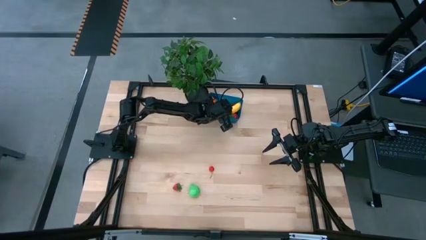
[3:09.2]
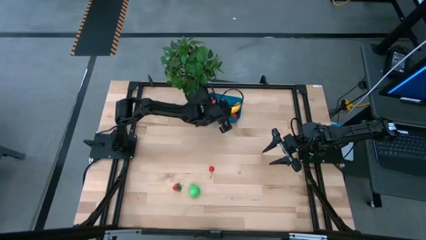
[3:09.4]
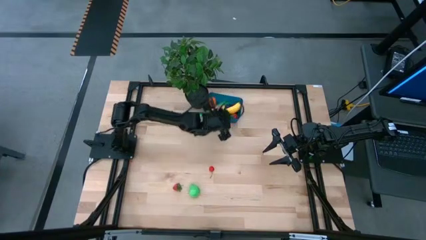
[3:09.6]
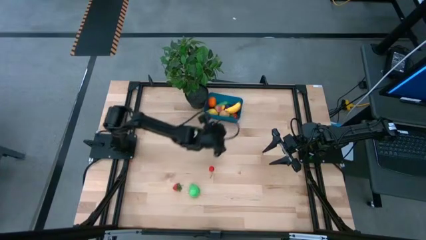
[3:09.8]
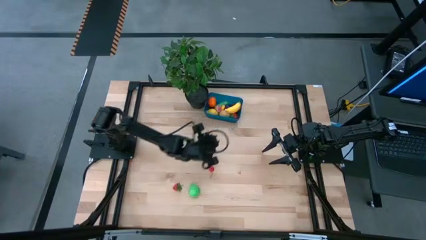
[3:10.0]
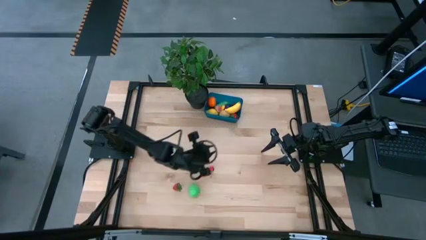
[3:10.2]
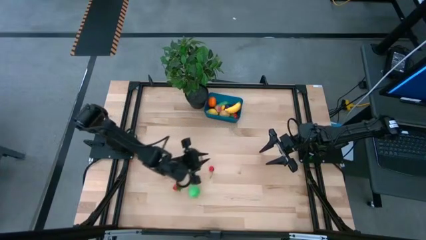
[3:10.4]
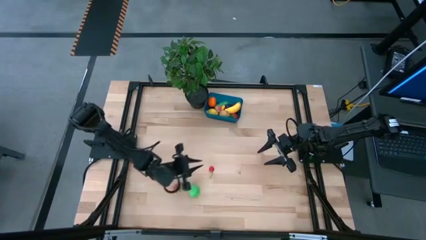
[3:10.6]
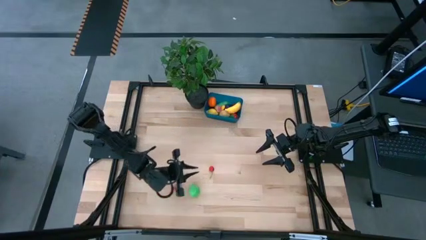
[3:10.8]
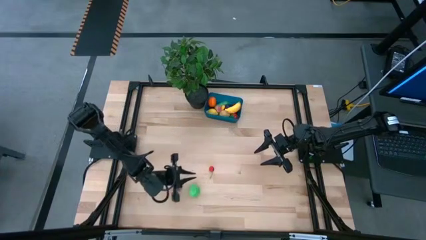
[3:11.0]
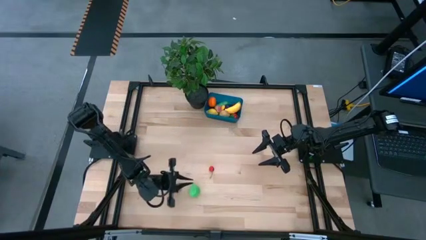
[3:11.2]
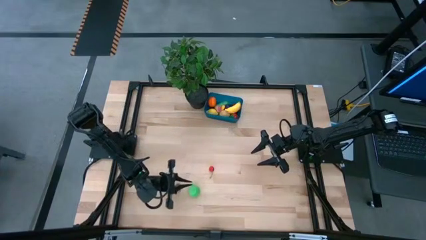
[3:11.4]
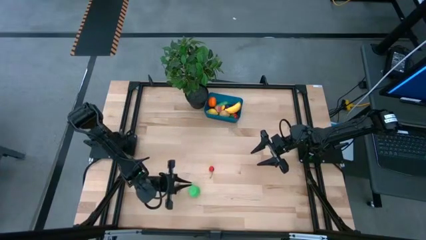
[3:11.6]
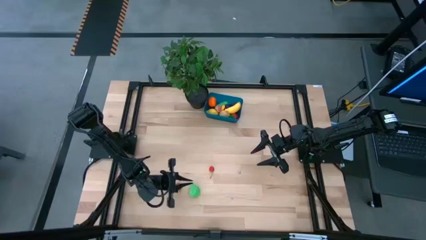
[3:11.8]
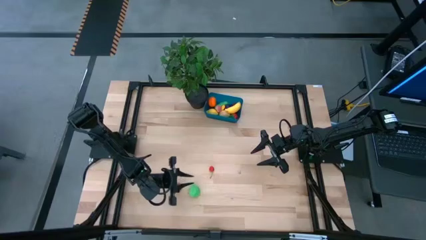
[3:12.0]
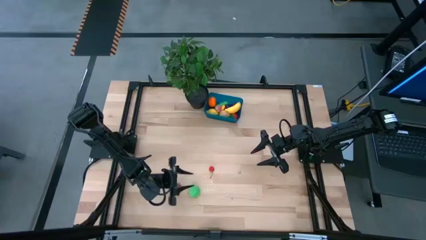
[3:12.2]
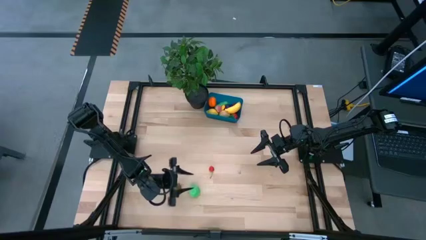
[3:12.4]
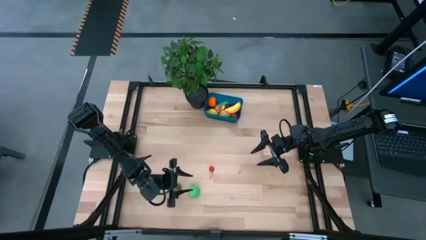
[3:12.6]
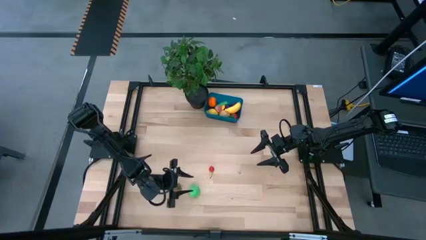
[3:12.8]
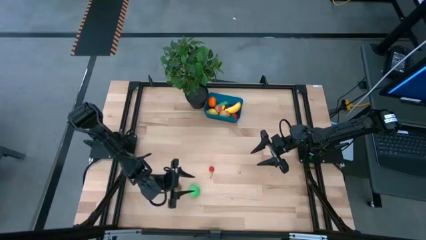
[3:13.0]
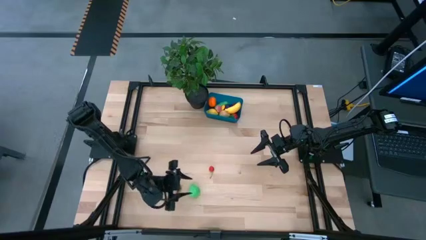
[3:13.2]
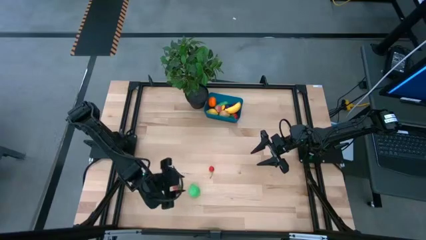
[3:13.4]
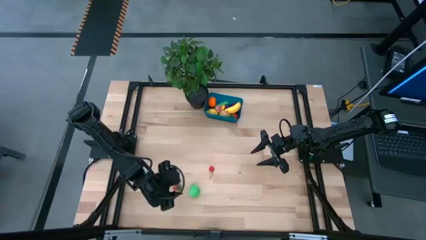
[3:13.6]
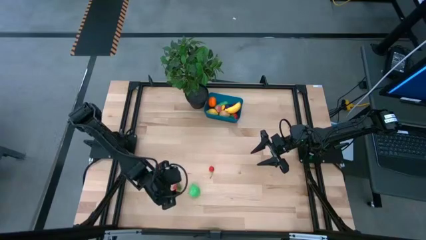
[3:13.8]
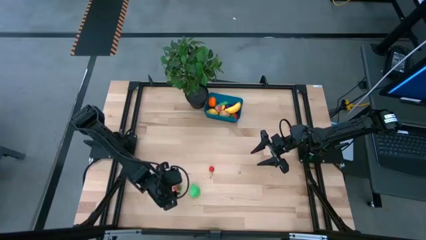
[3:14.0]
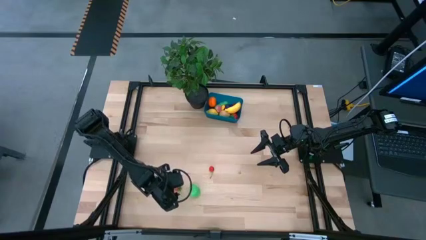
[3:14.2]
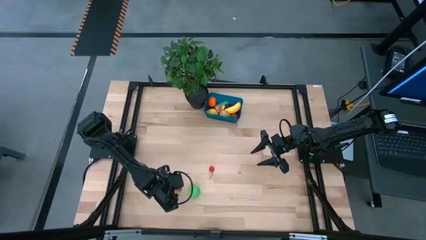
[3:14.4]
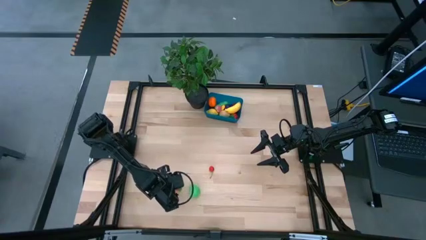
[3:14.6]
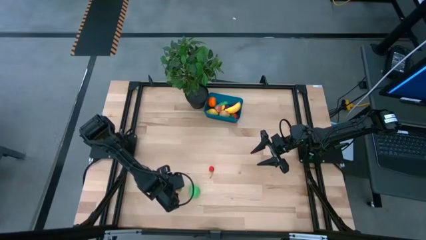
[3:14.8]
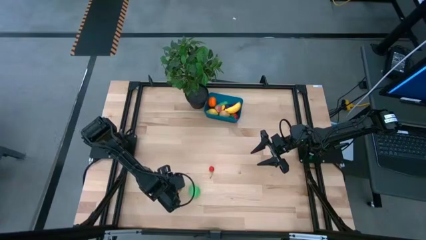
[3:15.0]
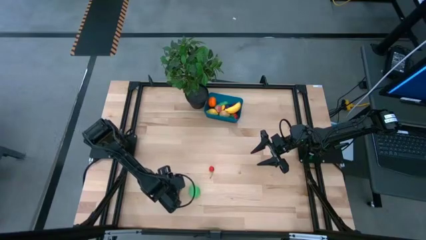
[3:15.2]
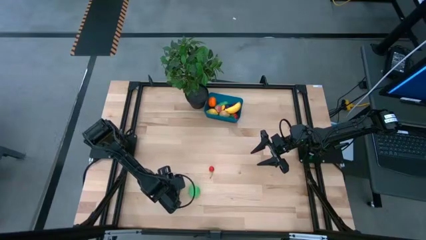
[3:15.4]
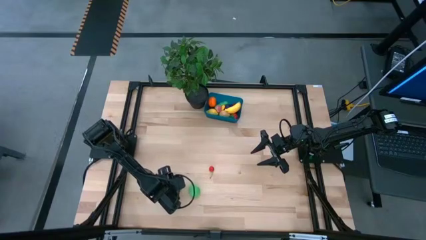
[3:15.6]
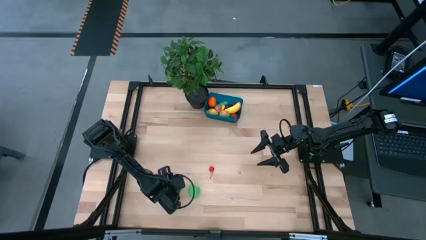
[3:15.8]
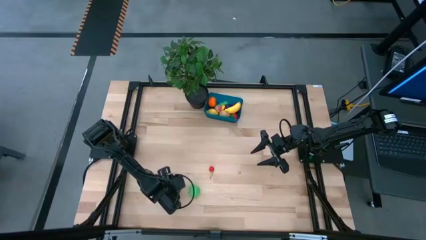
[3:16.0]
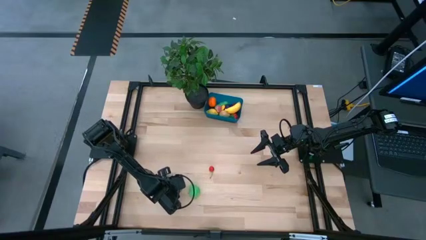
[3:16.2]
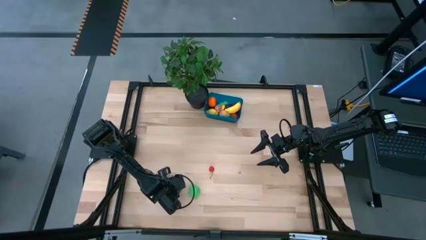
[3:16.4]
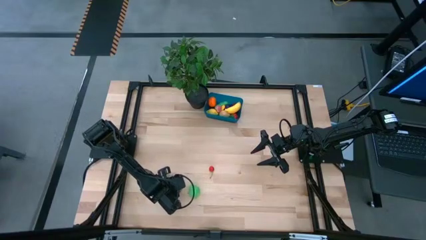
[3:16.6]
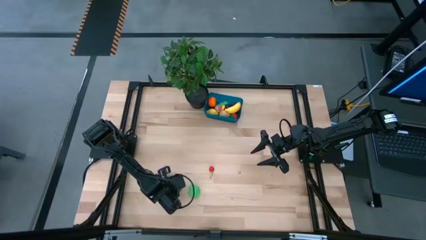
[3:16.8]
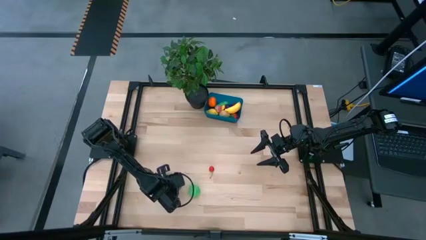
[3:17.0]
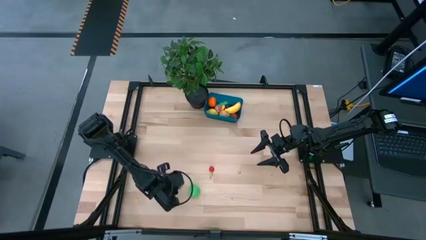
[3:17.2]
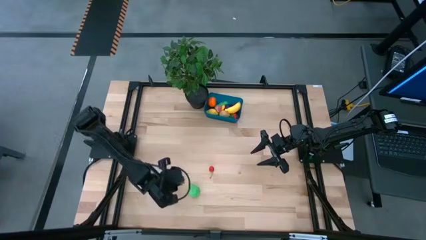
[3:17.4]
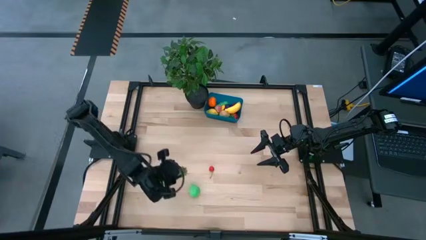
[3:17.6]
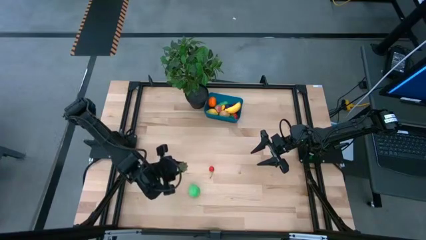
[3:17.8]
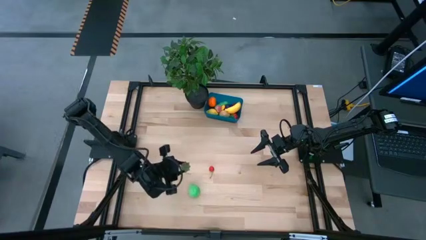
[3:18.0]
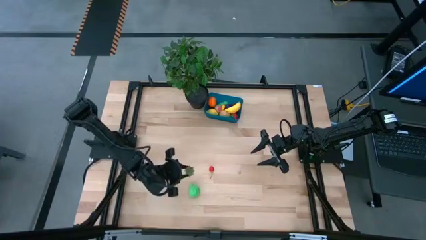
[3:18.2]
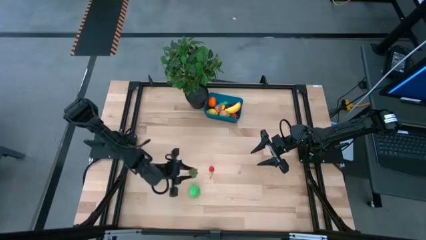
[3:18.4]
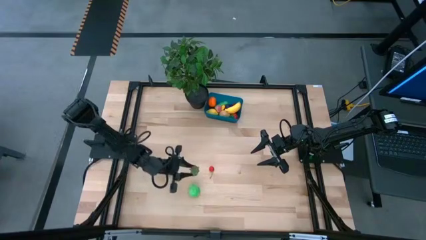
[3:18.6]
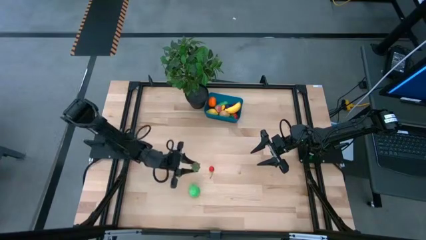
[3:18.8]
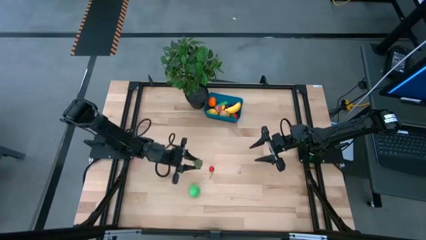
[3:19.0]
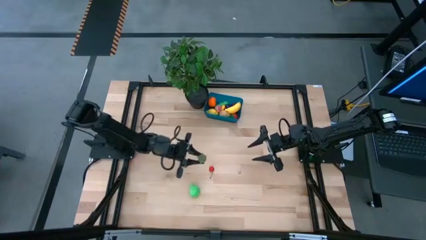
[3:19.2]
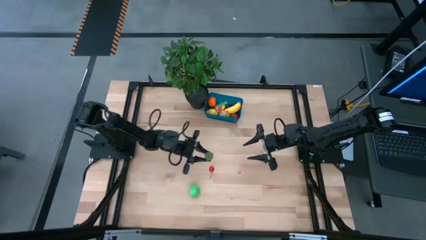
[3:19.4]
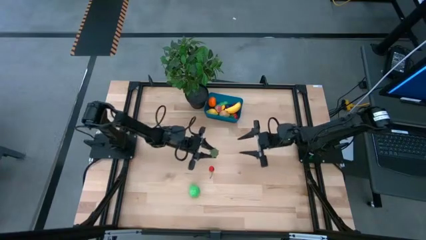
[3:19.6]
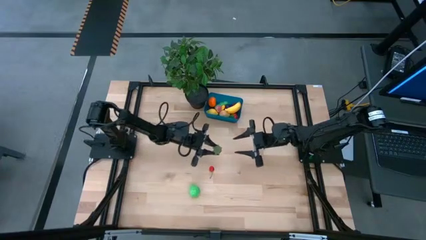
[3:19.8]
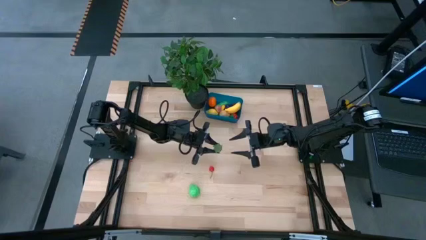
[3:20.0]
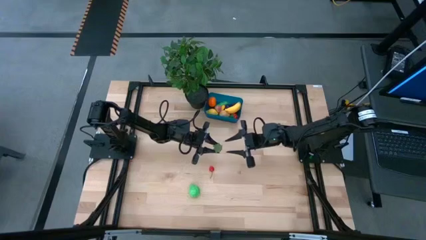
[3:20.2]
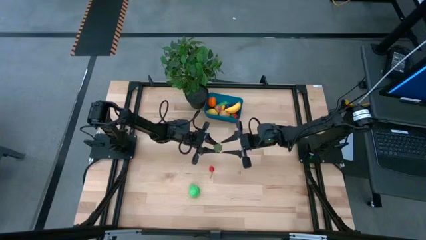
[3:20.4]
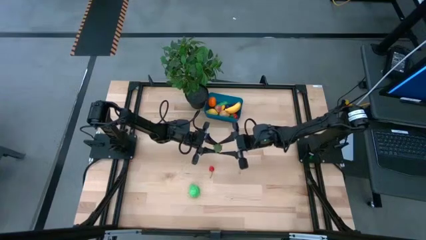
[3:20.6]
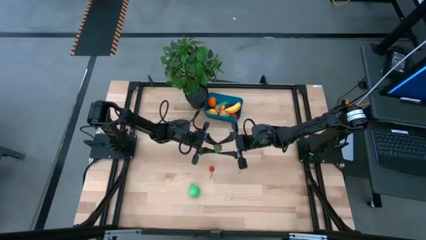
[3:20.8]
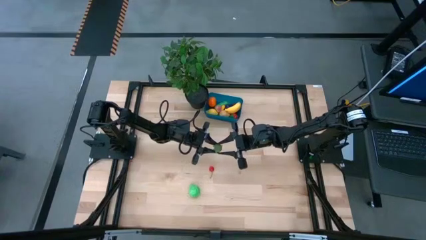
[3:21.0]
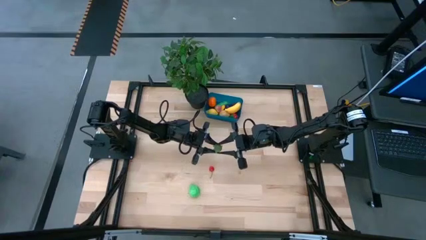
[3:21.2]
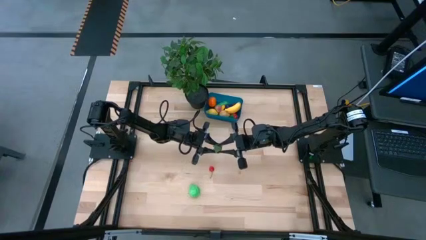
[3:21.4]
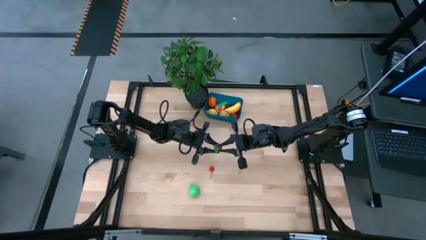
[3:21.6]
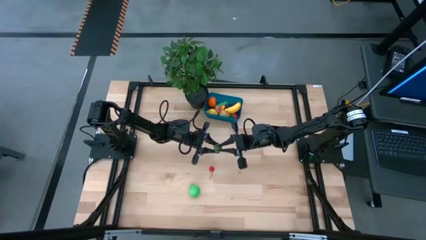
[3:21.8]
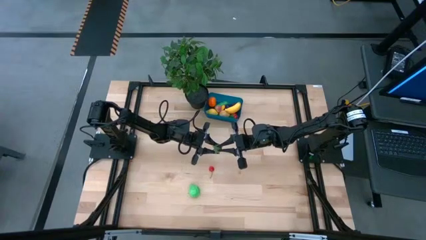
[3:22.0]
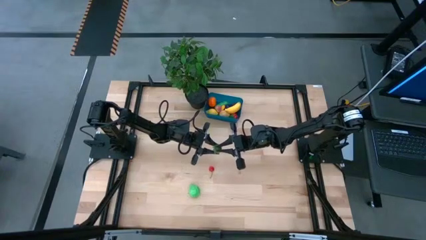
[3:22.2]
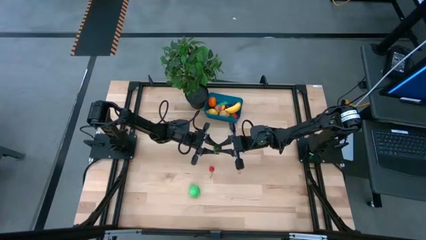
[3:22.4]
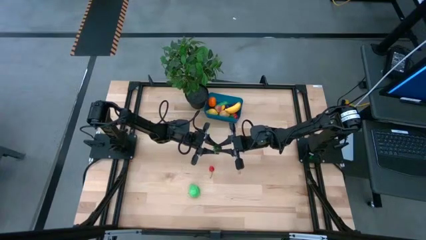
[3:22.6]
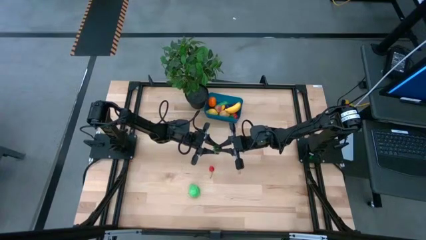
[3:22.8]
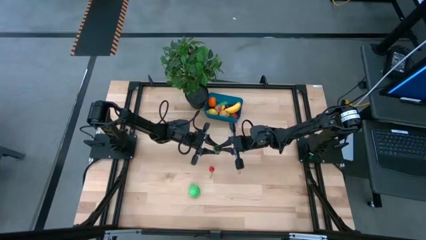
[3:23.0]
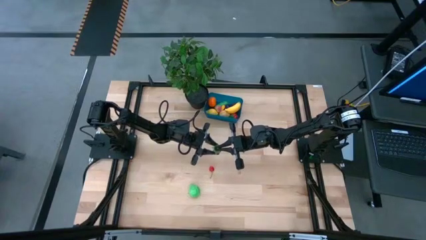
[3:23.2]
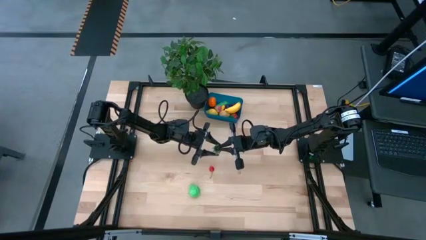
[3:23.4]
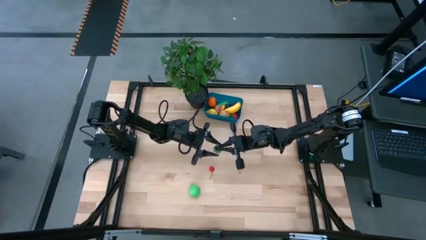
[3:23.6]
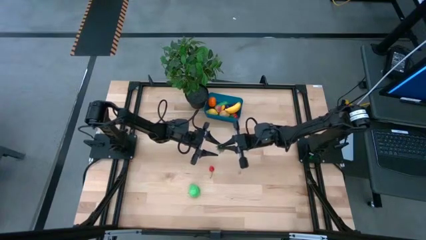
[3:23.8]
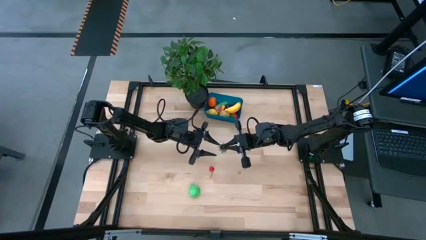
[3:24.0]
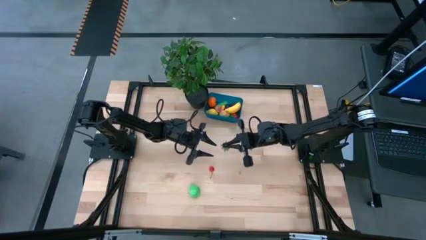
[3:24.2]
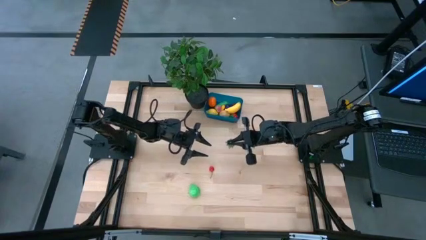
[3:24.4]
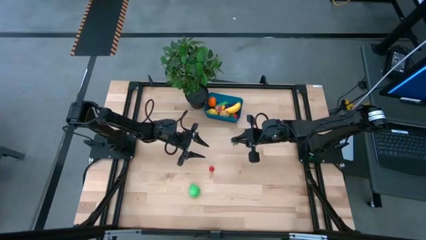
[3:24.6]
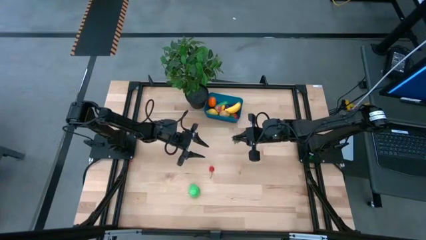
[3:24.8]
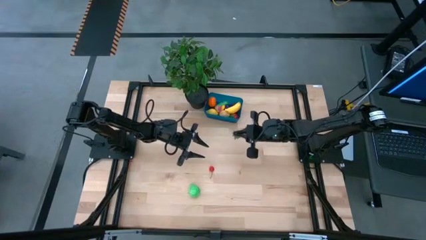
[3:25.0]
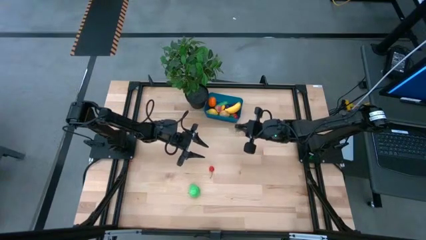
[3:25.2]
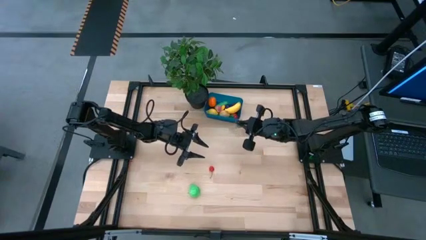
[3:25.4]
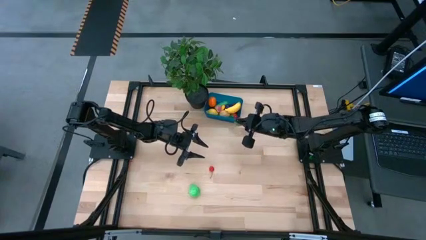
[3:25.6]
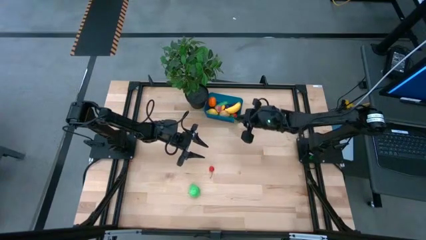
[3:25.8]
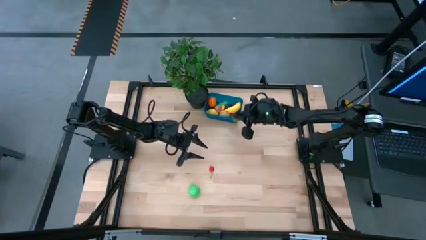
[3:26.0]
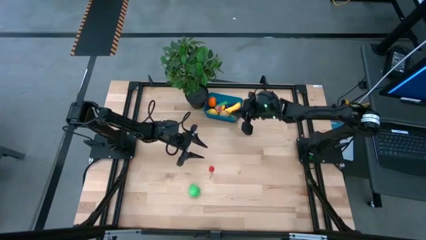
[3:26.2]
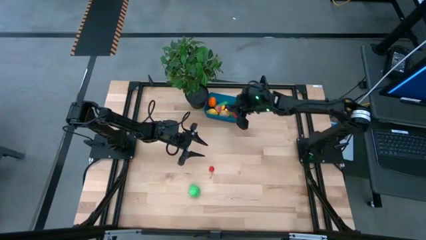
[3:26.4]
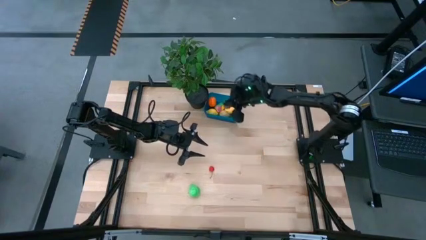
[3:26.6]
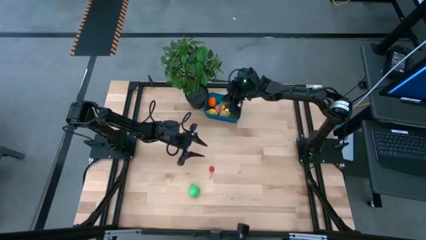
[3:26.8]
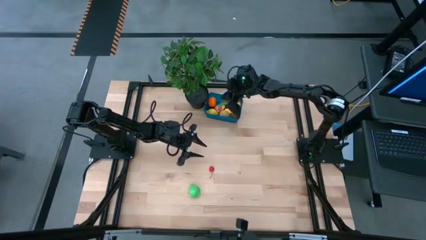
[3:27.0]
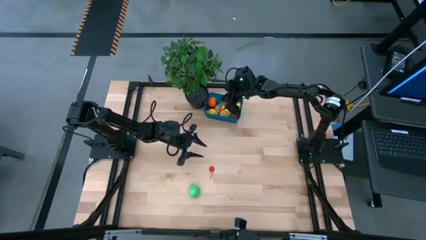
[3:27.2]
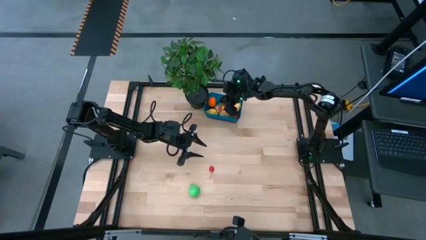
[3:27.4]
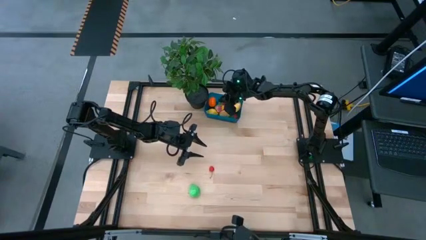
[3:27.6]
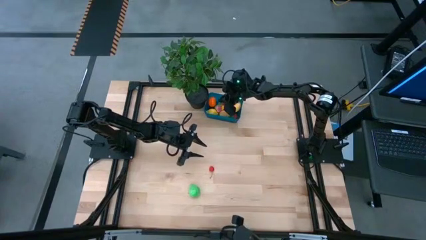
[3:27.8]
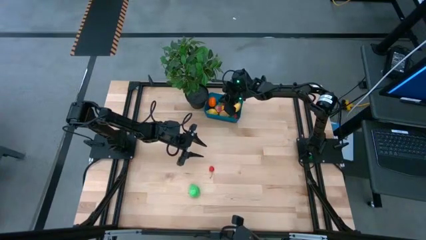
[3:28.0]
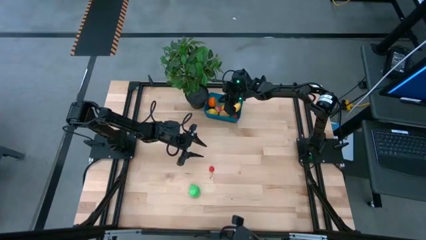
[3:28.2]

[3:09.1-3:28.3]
Task: Pick and placing Produce into tupperware
Put the red strawberry into the blue container
